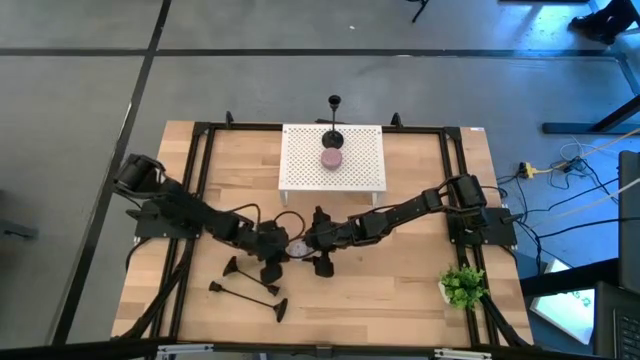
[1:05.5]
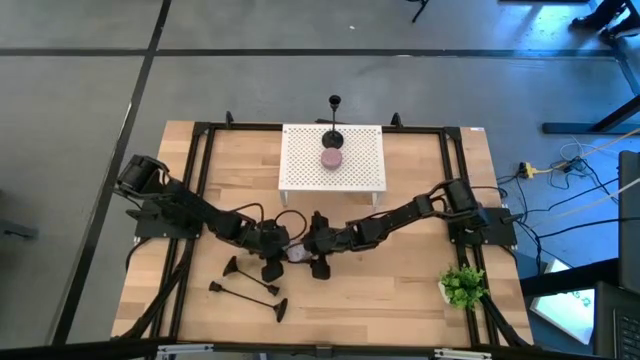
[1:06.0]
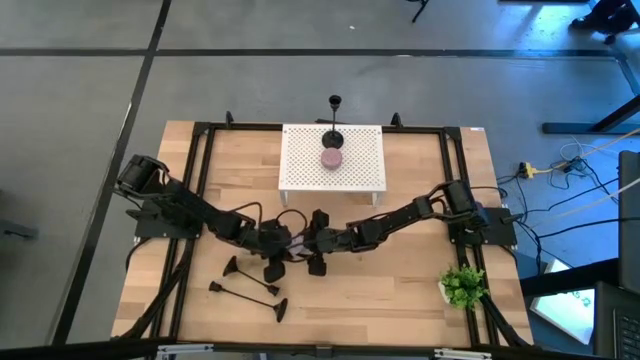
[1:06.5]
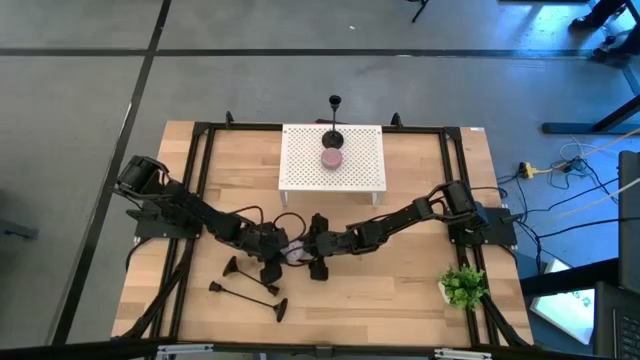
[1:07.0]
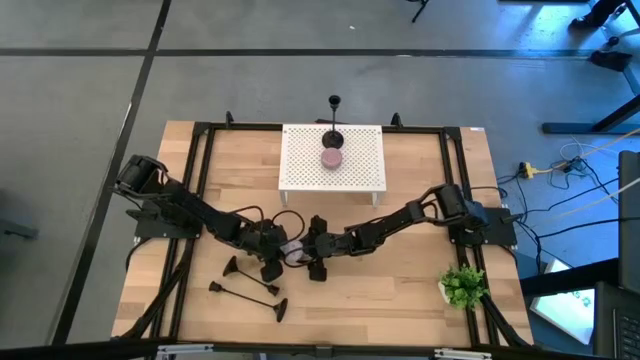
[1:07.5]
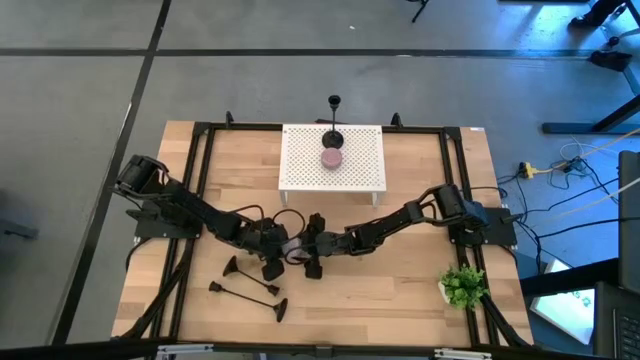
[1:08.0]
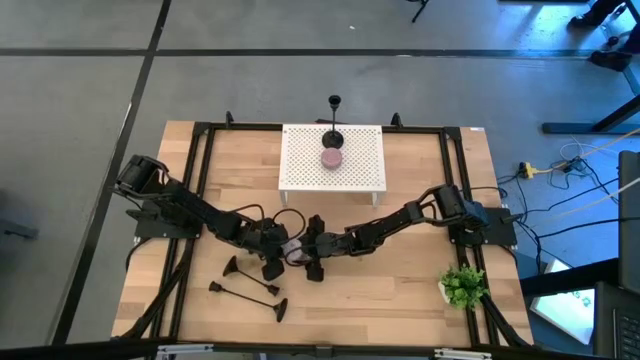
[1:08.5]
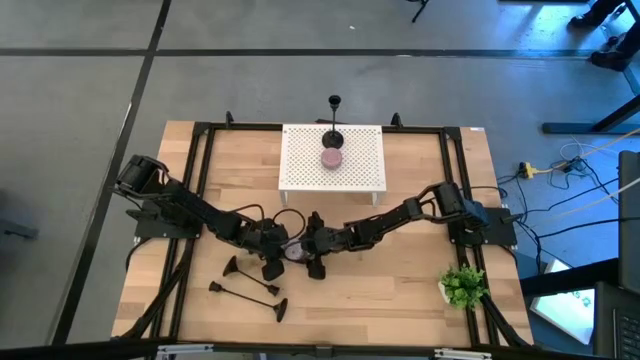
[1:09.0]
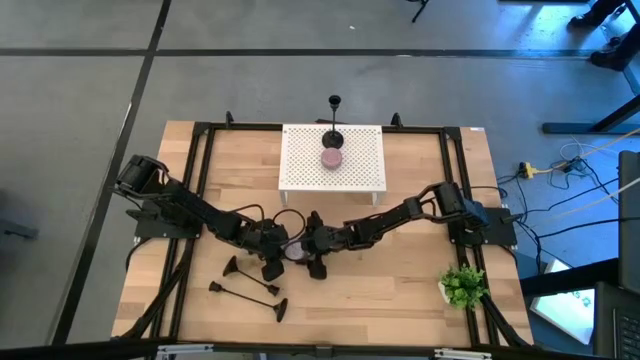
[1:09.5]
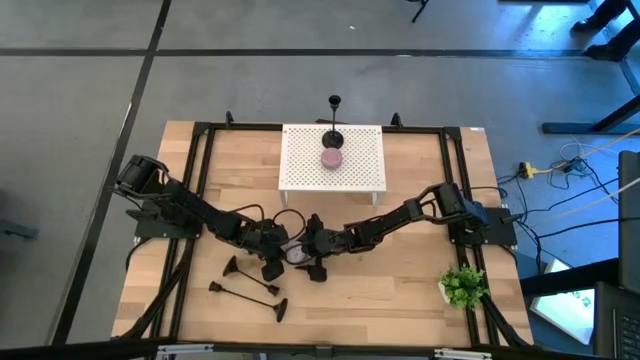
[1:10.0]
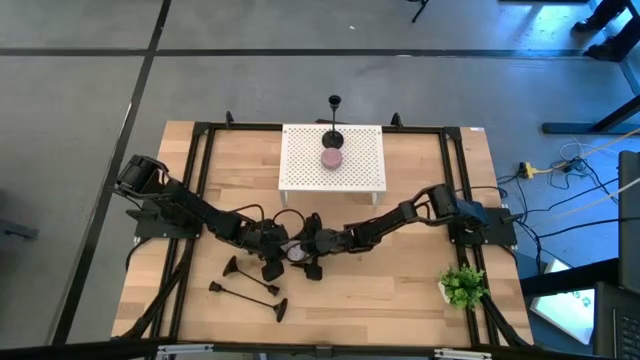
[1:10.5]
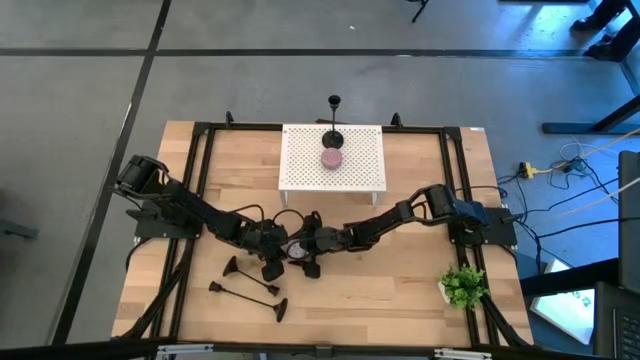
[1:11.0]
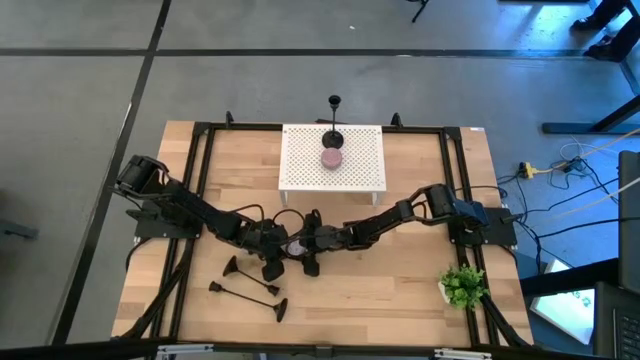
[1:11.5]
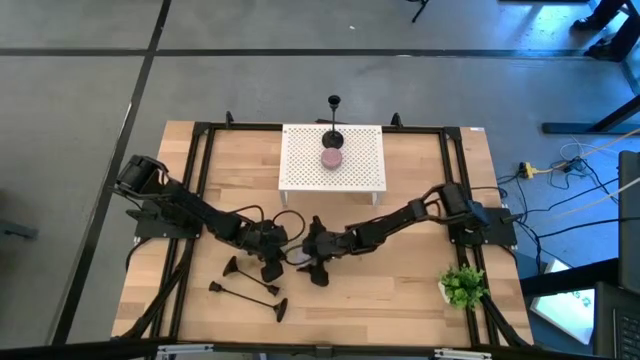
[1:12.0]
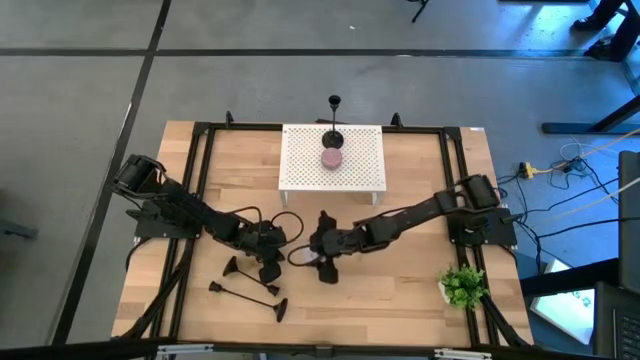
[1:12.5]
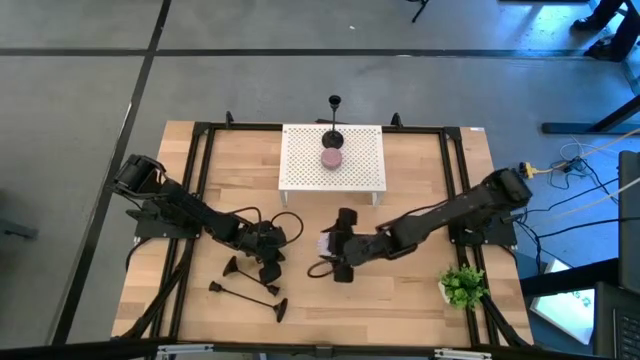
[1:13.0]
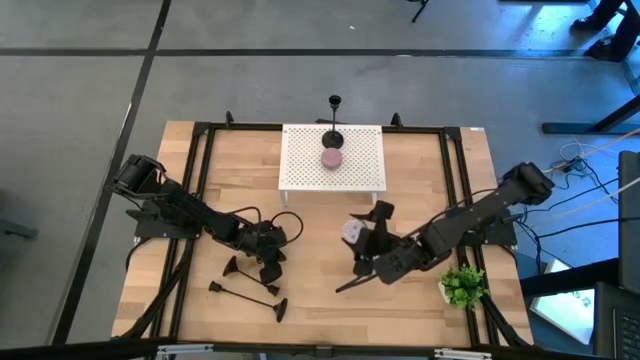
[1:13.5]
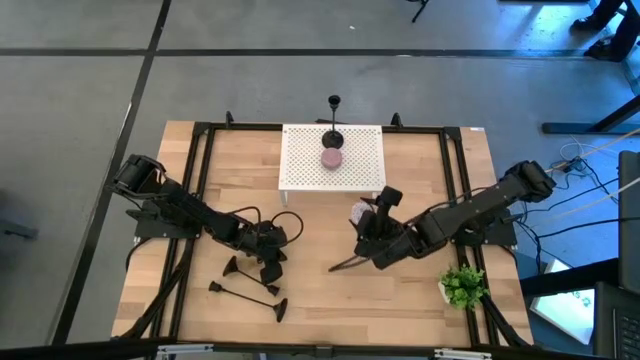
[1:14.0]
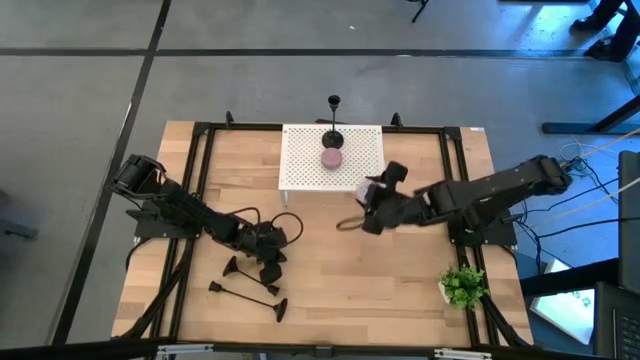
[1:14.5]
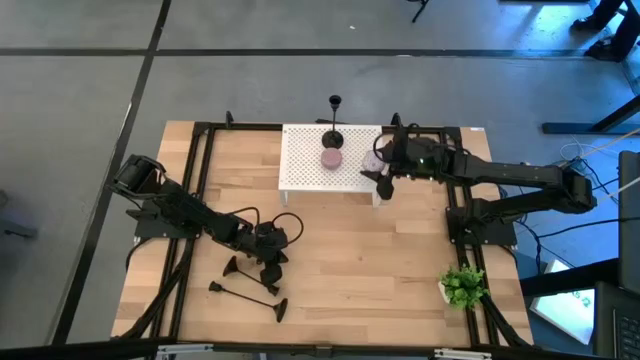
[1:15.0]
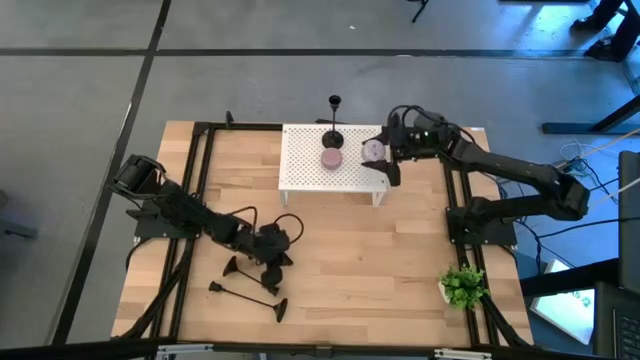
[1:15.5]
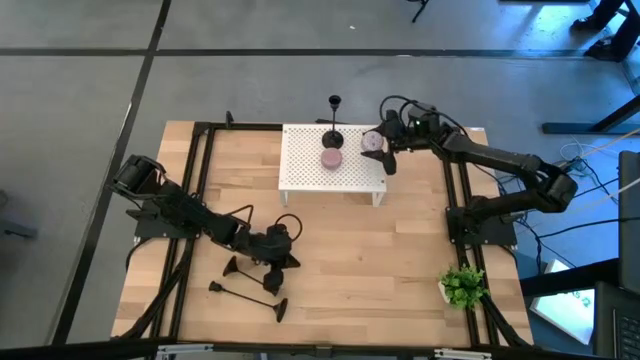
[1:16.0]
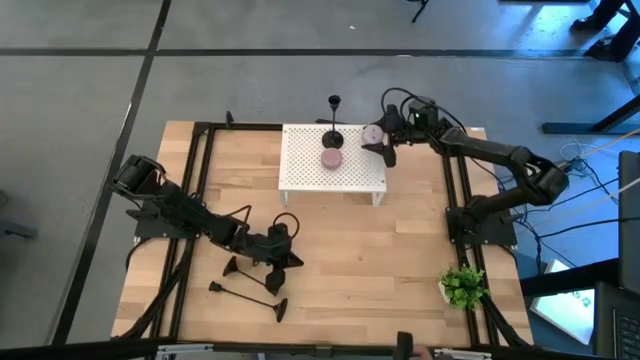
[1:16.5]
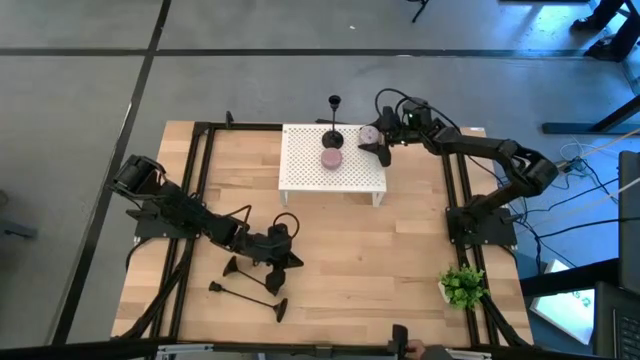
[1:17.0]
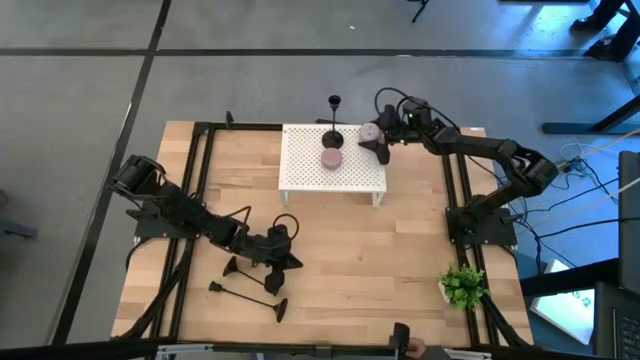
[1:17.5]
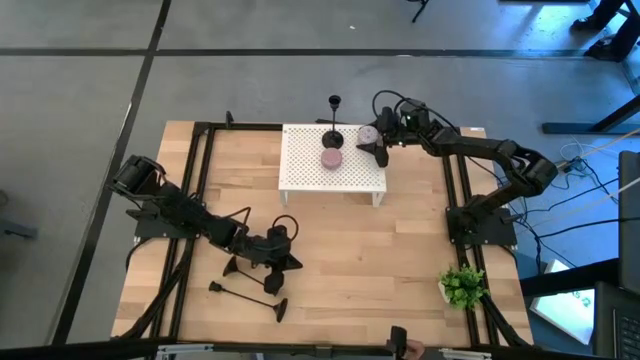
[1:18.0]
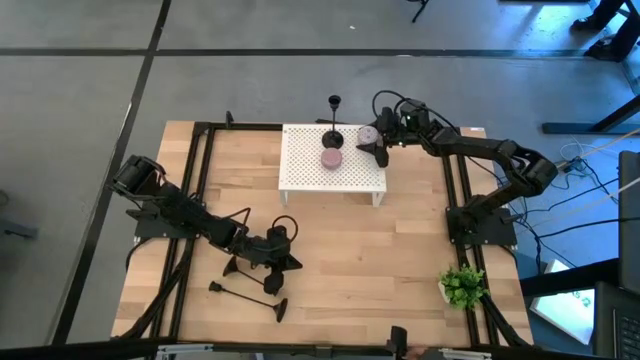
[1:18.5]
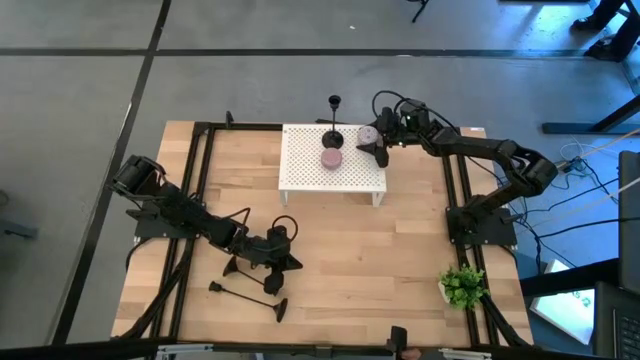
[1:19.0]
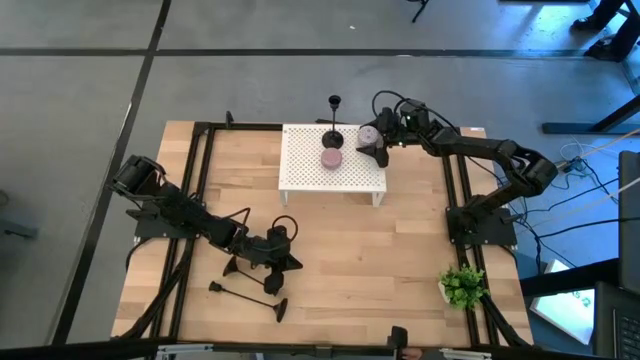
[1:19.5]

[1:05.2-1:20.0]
Task: Pick & Place candle stick holders
Put the white scented candle on the shelf

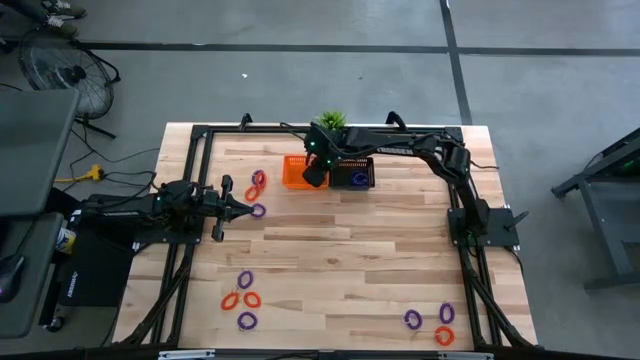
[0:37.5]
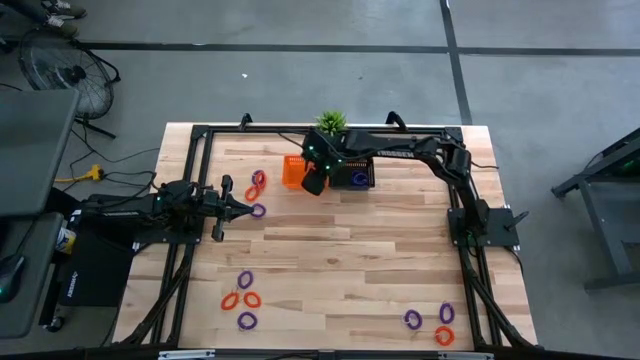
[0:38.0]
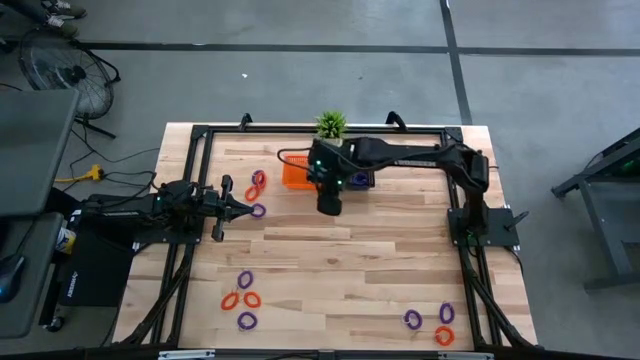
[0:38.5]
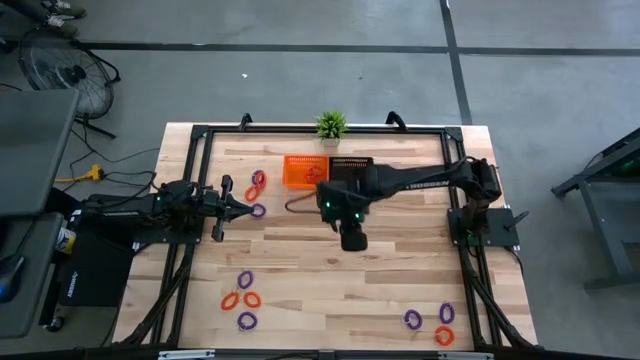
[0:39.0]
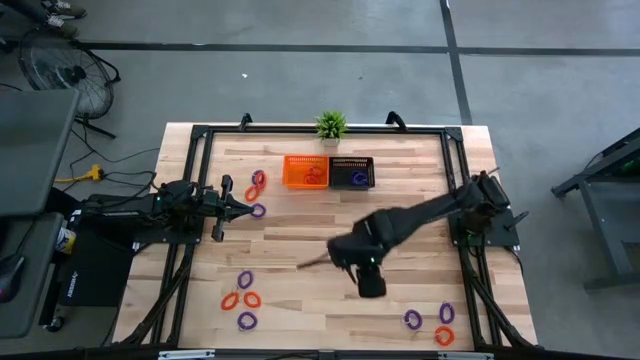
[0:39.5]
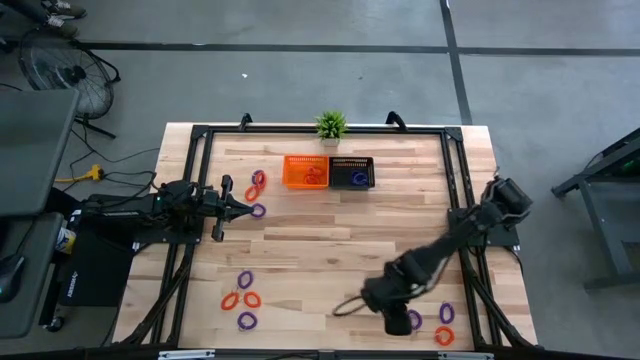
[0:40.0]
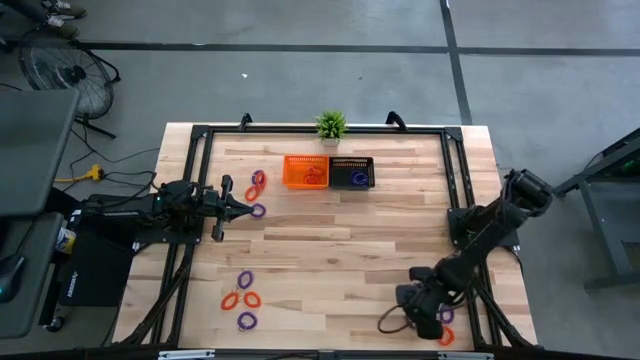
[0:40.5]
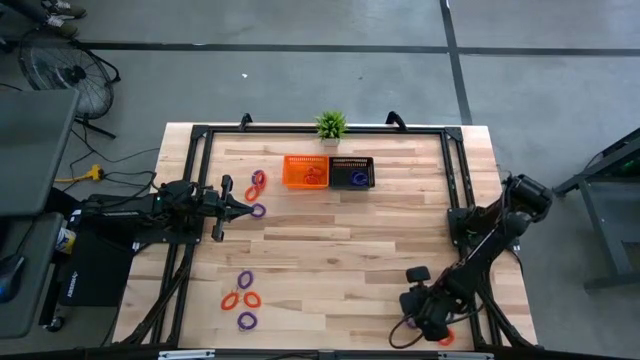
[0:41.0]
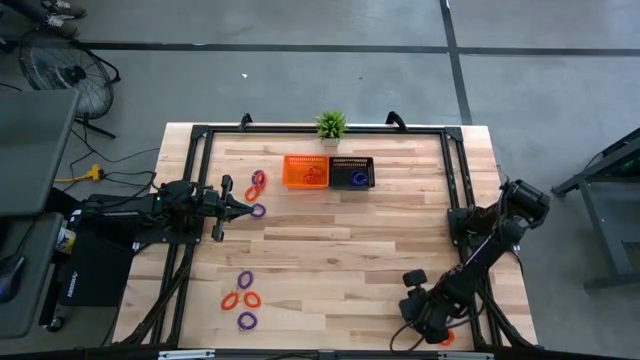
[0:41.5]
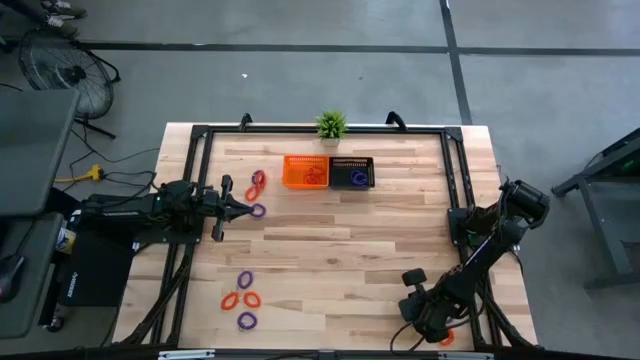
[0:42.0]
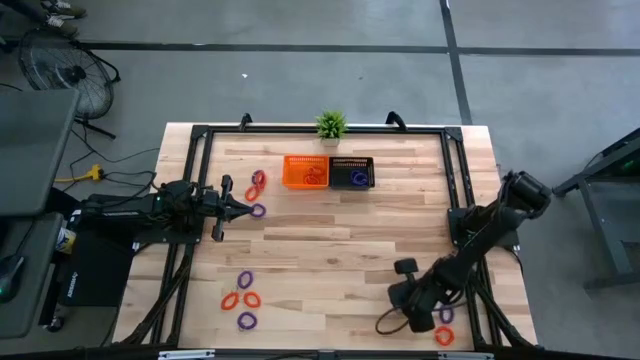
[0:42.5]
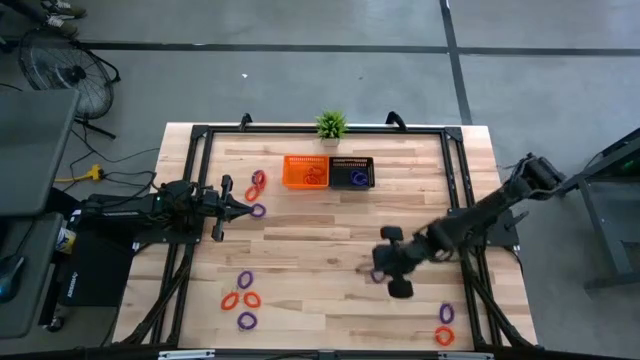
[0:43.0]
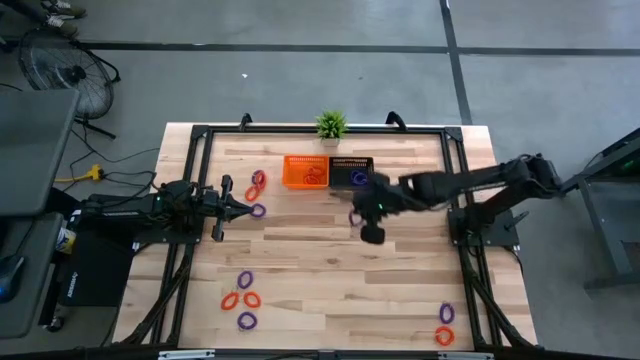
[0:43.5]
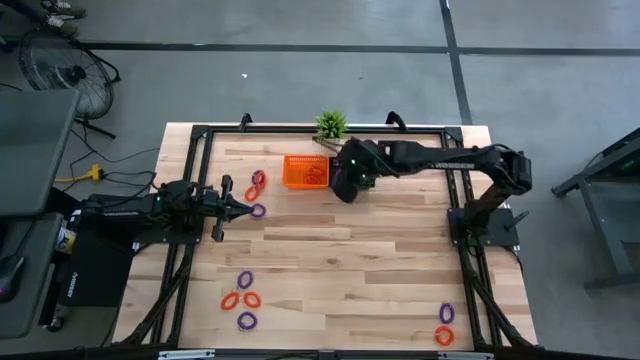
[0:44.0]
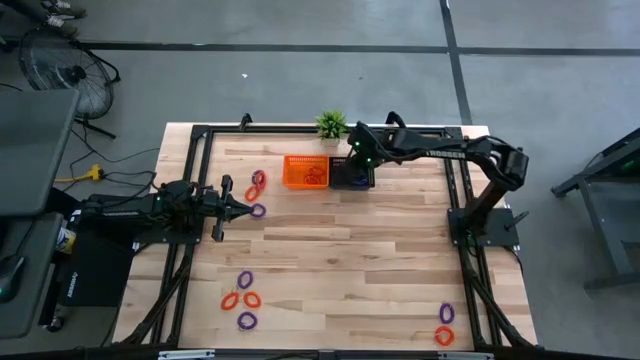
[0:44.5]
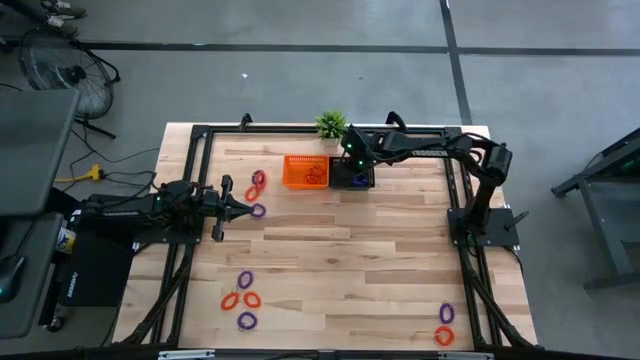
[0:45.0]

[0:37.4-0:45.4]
Task: Sort spring keychains into baskets
Put the purple spring keychain into the black basket
